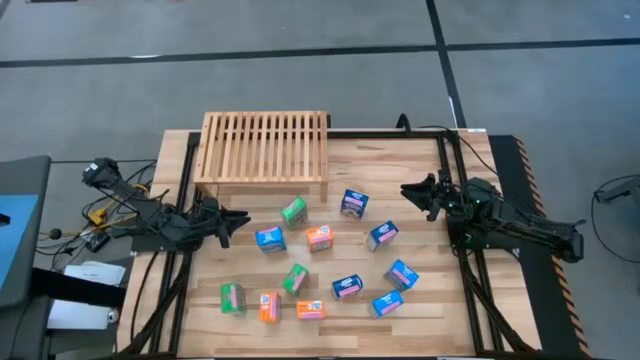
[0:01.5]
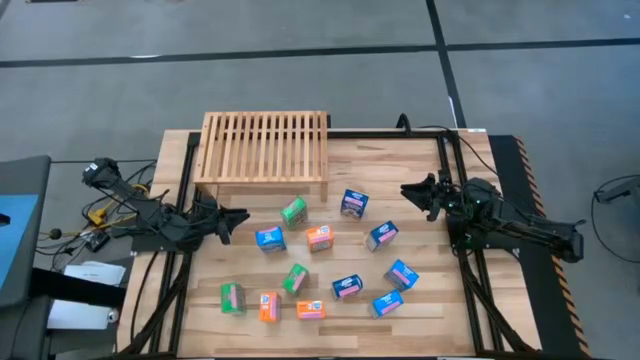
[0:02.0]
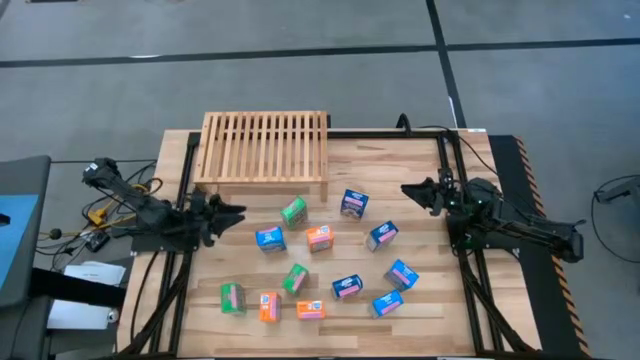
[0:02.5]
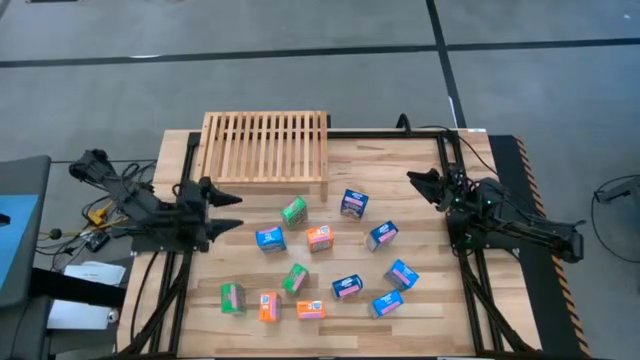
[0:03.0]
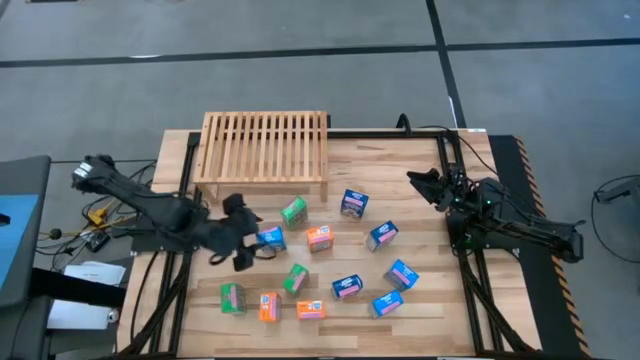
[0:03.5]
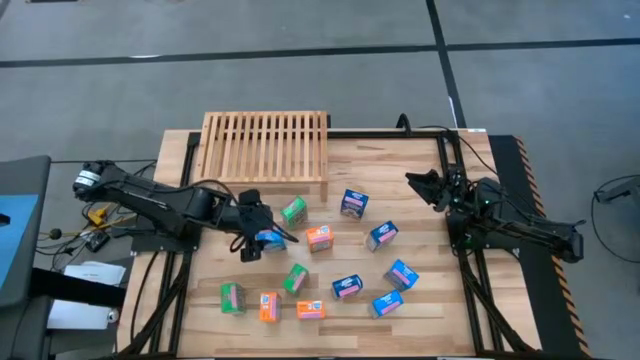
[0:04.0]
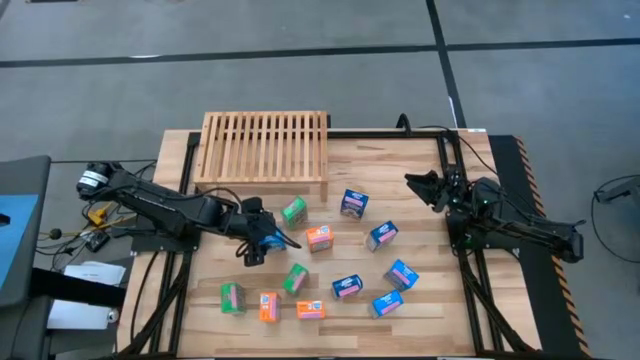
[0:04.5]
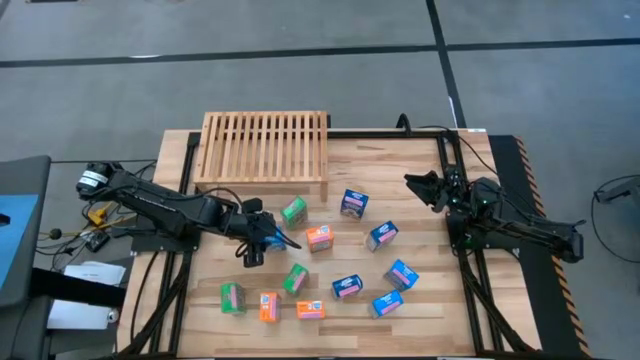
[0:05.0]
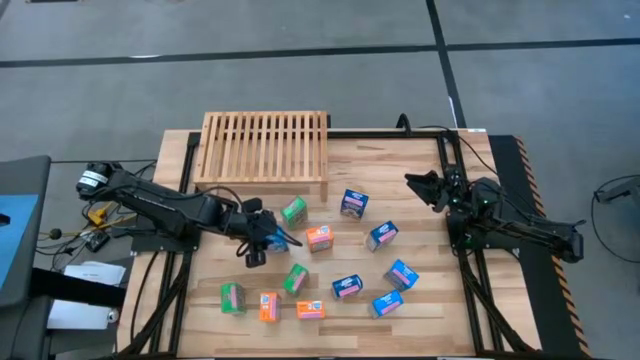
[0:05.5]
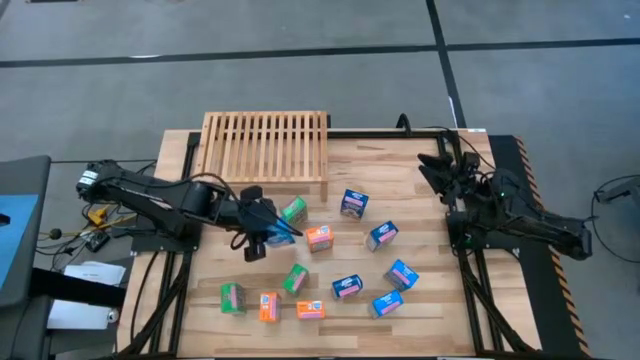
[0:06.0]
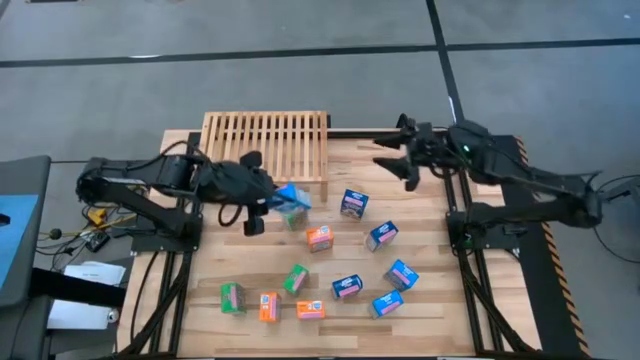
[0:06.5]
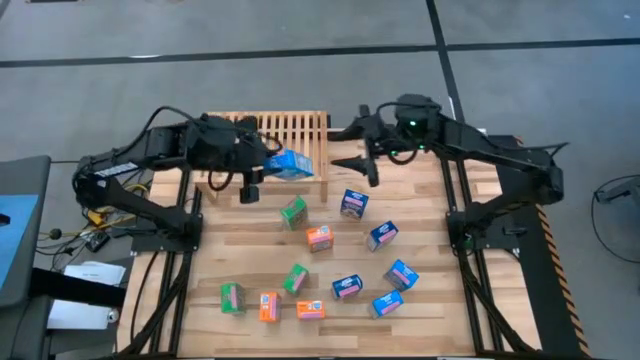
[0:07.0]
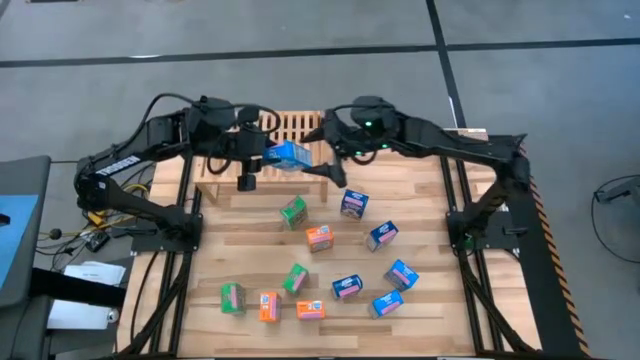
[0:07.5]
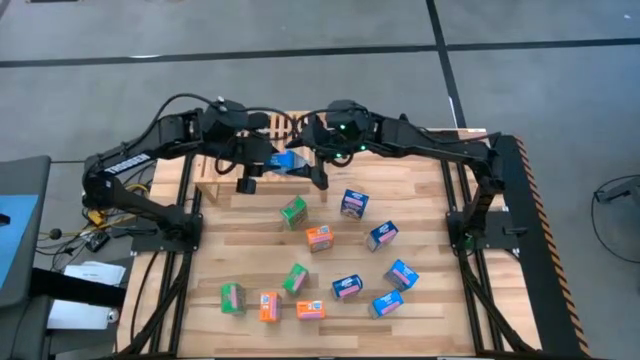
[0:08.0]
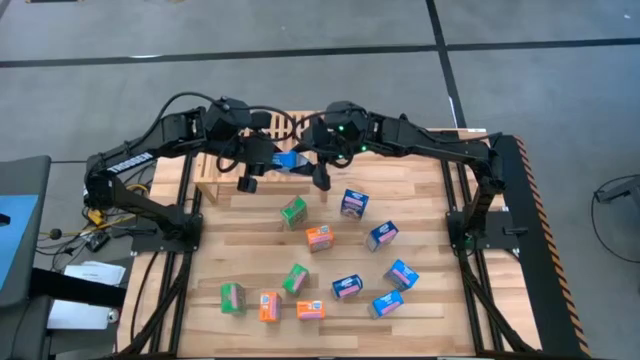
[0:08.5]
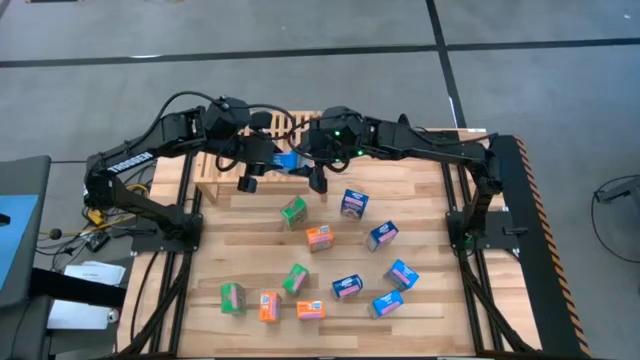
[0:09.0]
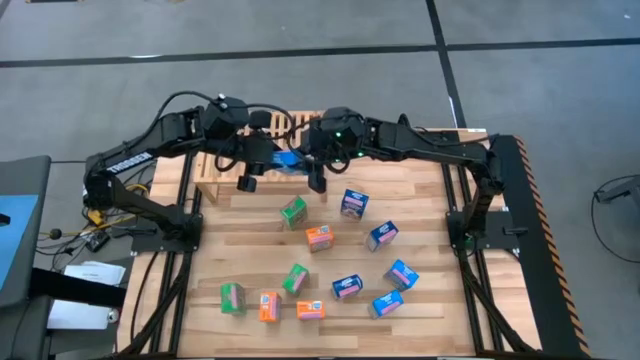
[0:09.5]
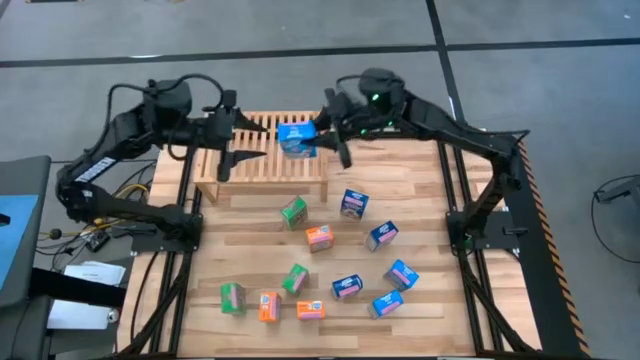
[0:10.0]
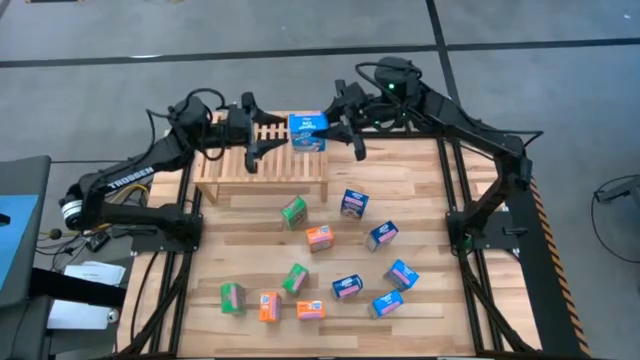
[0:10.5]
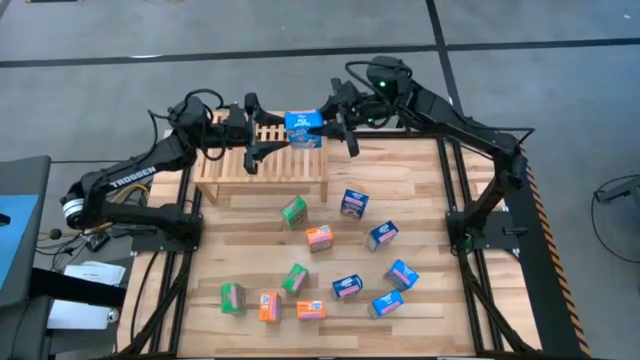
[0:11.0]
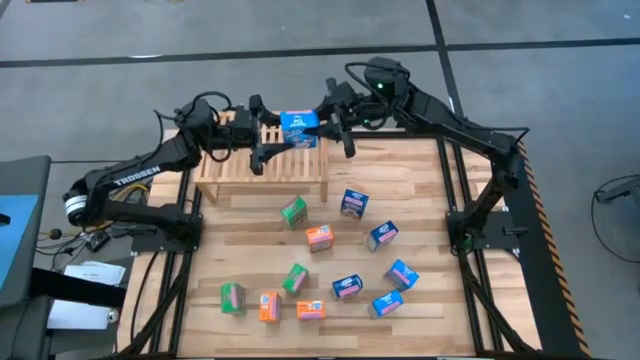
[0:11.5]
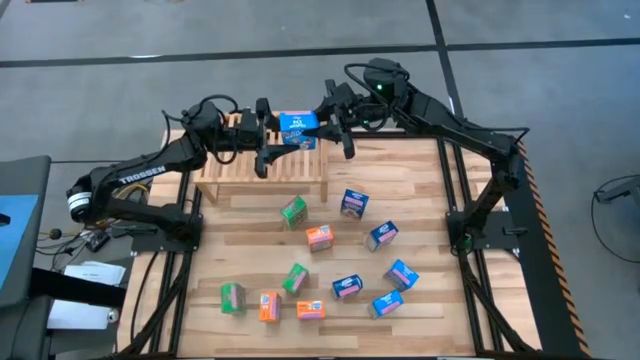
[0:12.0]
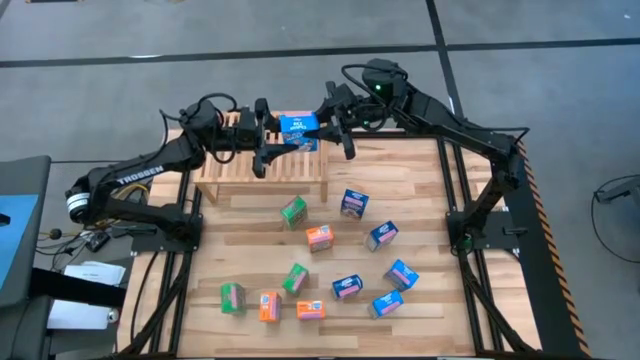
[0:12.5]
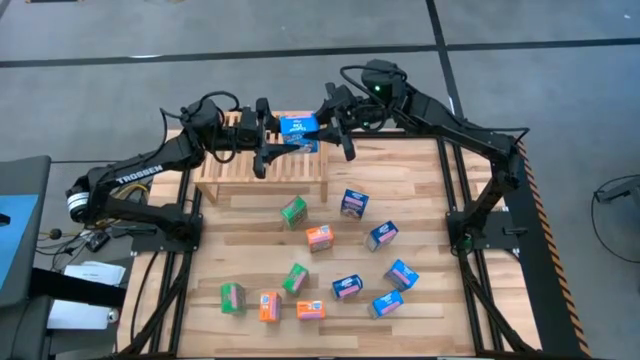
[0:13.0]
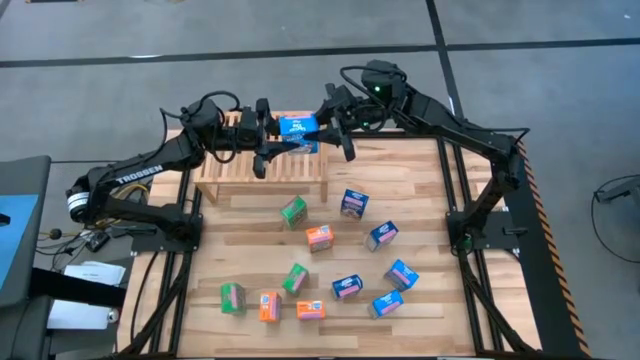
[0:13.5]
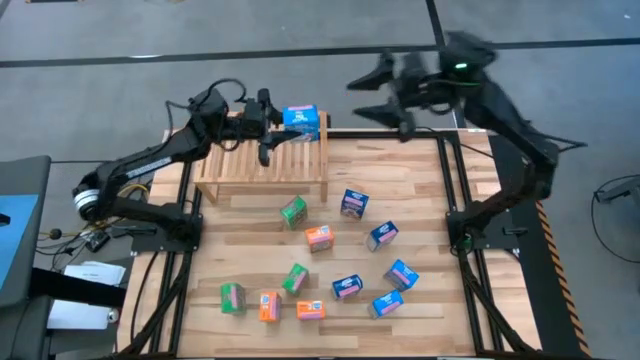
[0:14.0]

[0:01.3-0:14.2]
Task: Stack cereal on shelf
Put the top light blue cereal box on the shelf

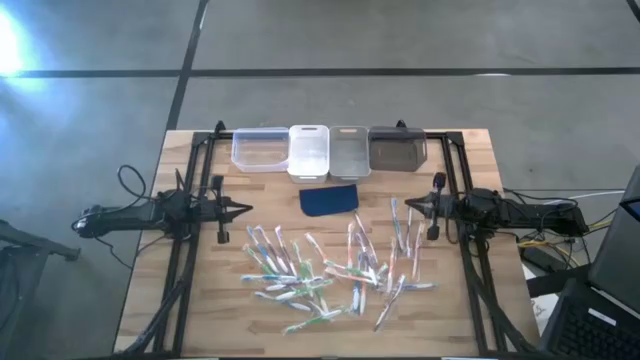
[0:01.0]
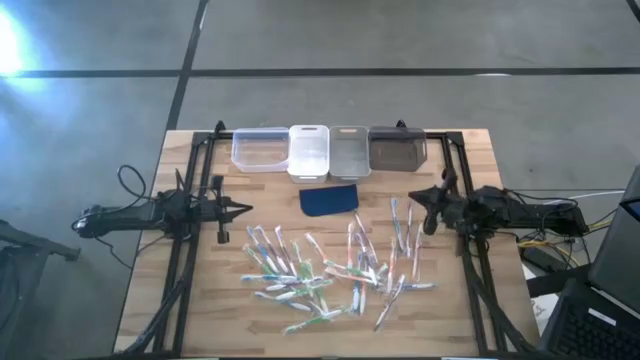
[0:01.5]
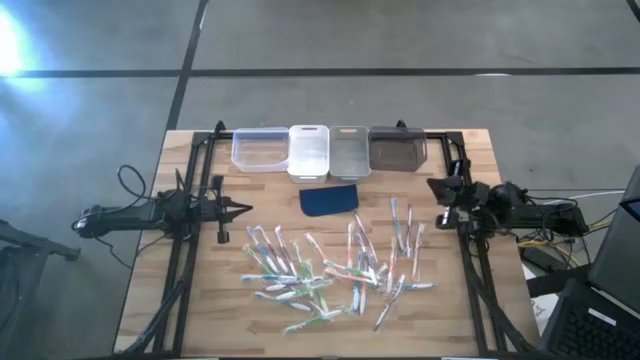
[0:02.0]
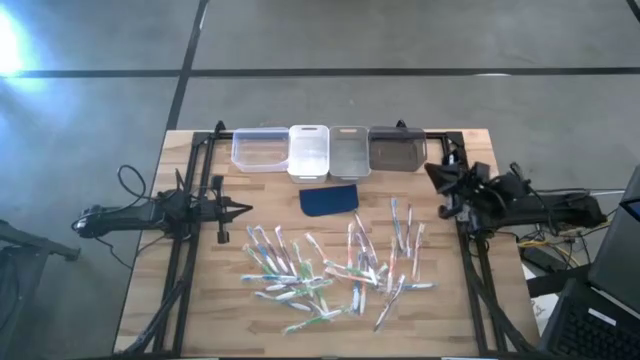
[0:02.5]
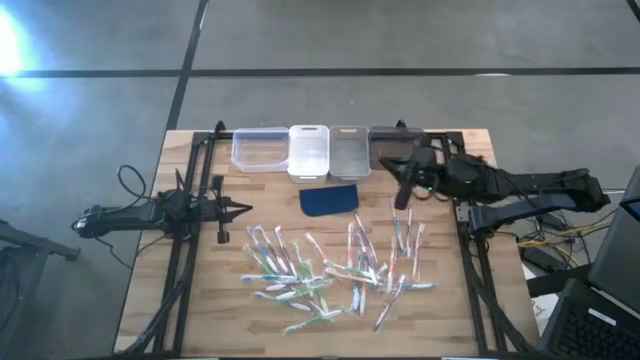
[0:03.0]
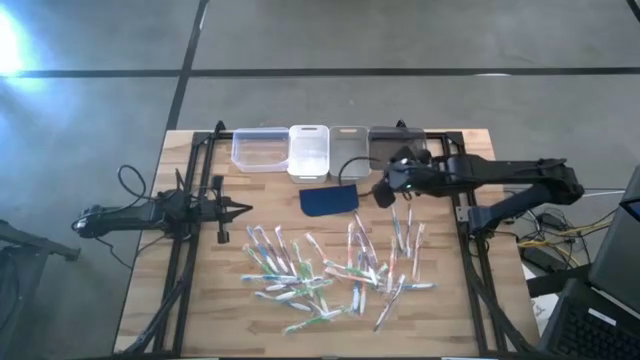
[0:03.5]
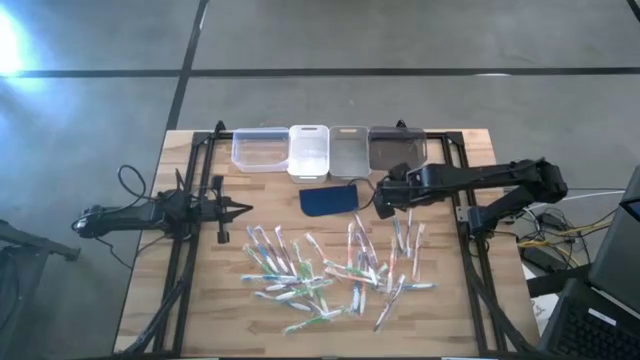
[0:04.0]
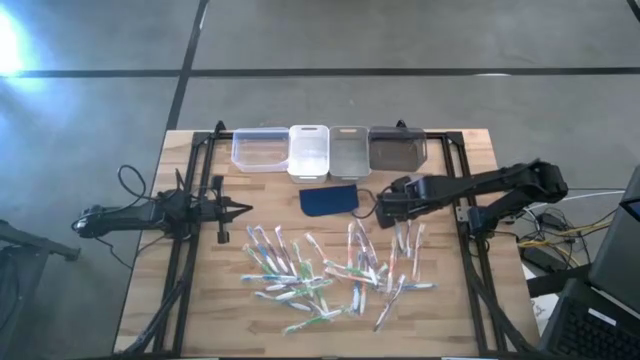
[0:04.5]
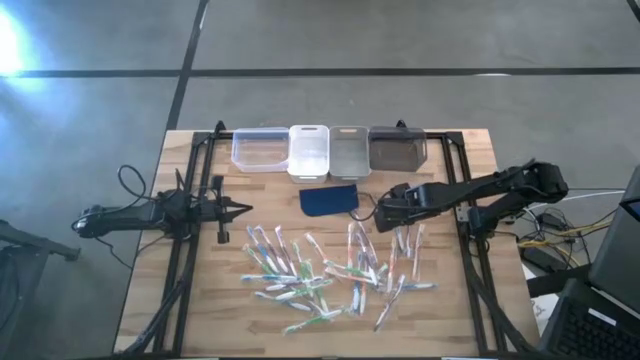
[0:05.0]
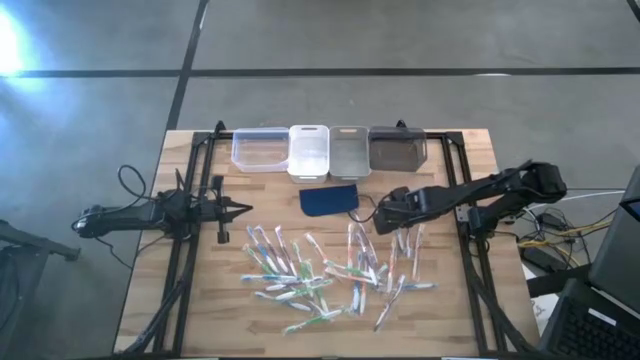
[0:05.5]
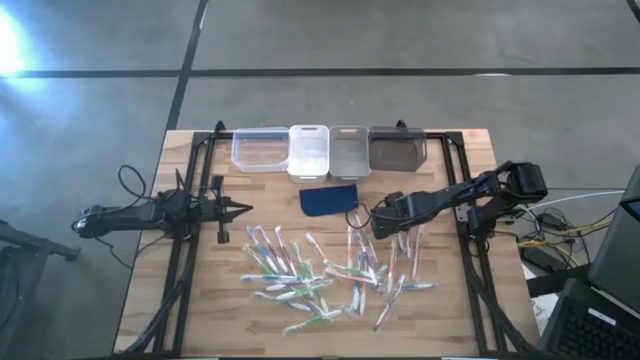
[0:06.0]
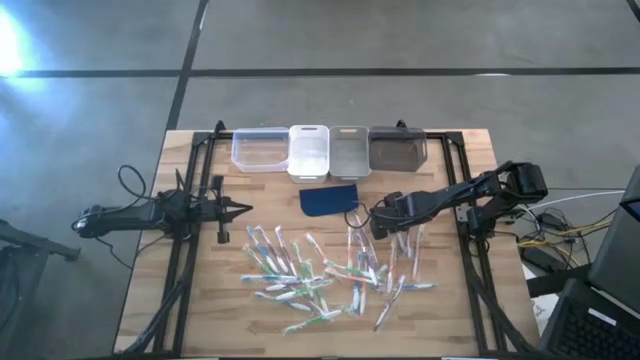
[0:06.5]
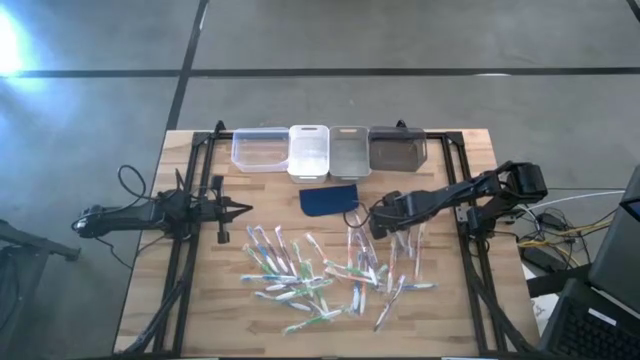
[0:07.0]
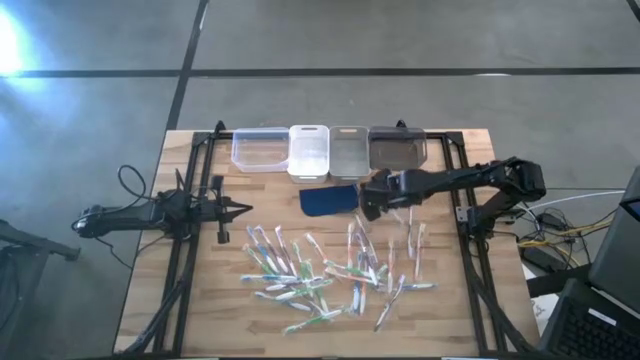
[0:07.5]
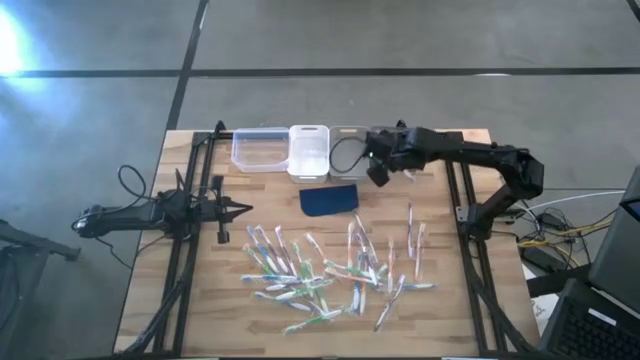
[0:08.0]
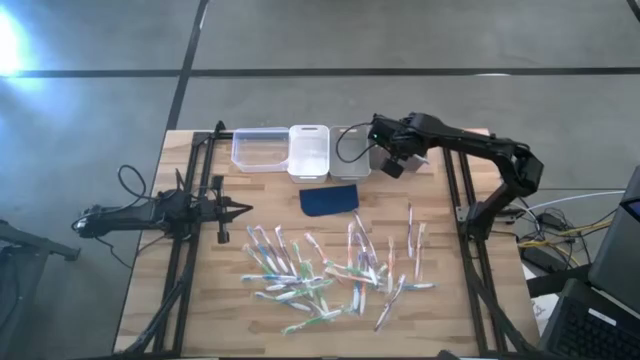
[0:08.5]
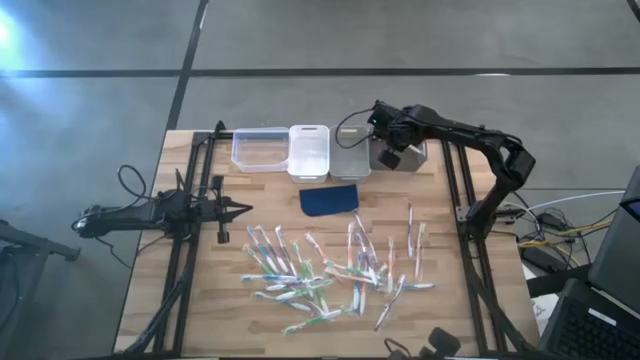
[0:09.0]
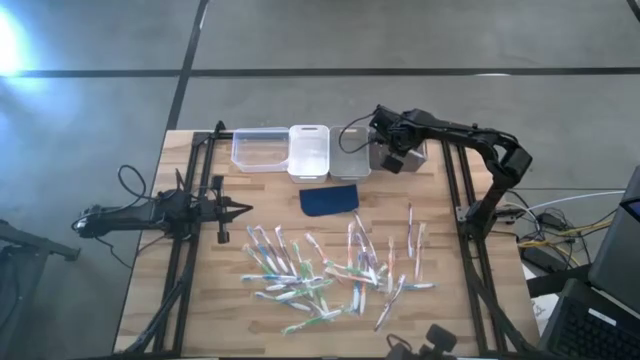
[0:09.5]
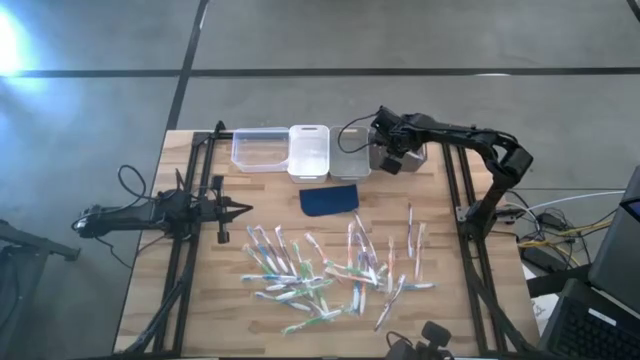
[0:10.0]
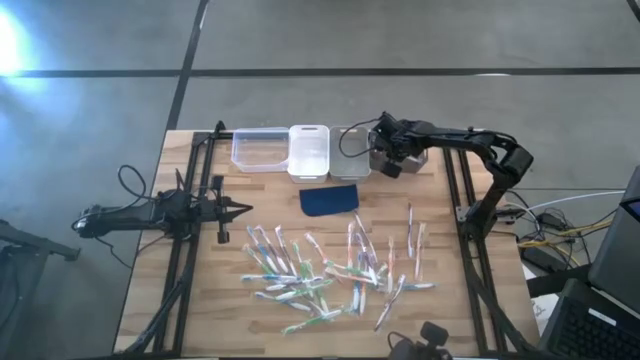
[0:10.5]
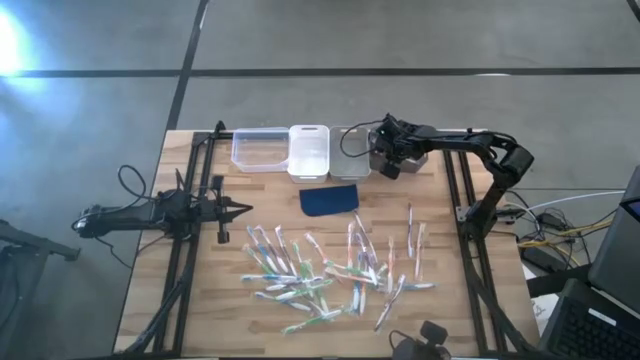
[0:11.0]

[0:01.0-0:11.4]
Task: Pick & Place Toothbrushes
Put the blue toothbrush into the transparent black bin
